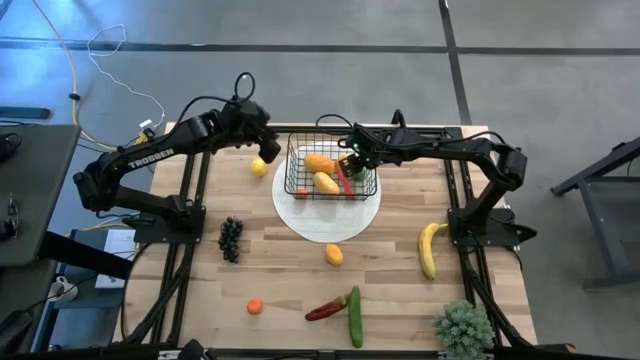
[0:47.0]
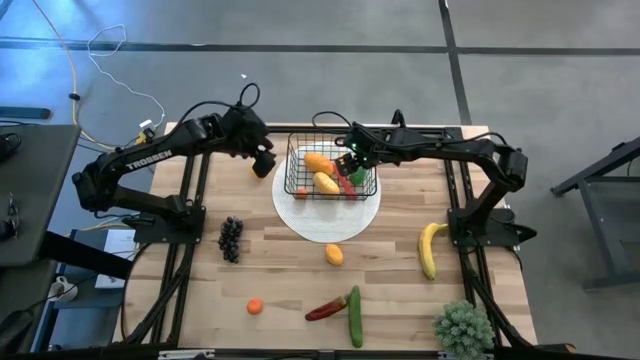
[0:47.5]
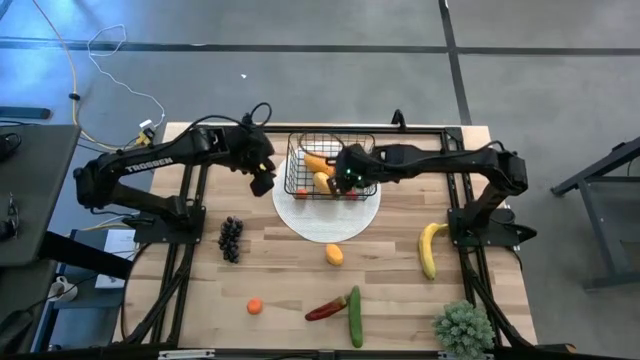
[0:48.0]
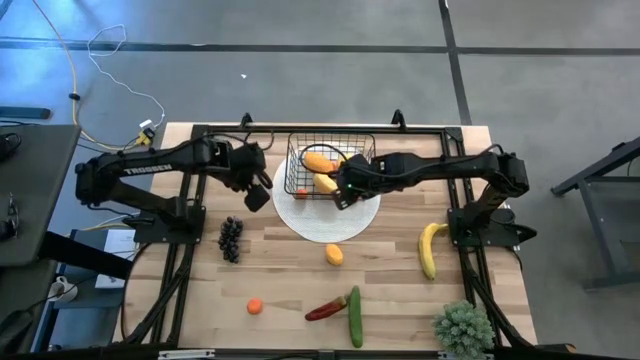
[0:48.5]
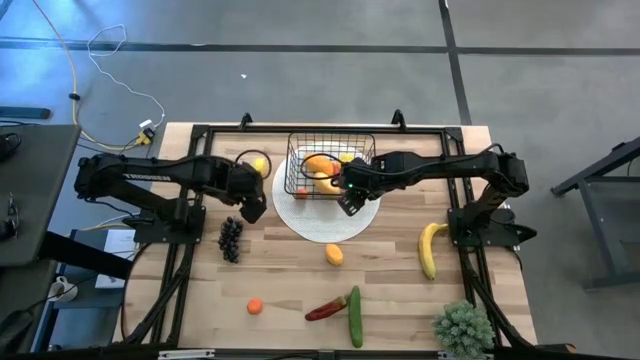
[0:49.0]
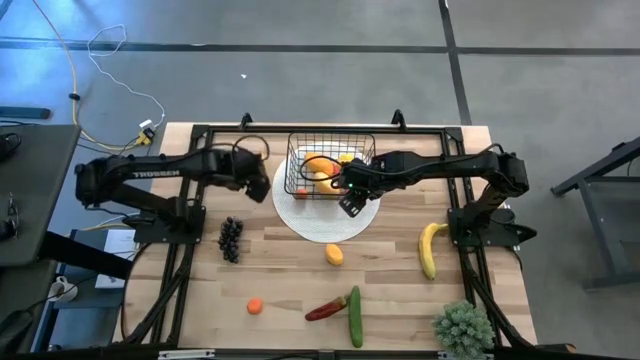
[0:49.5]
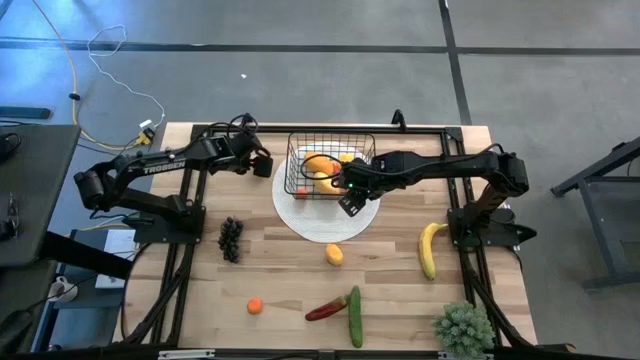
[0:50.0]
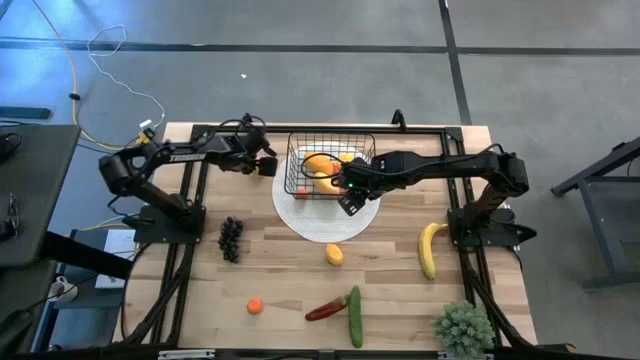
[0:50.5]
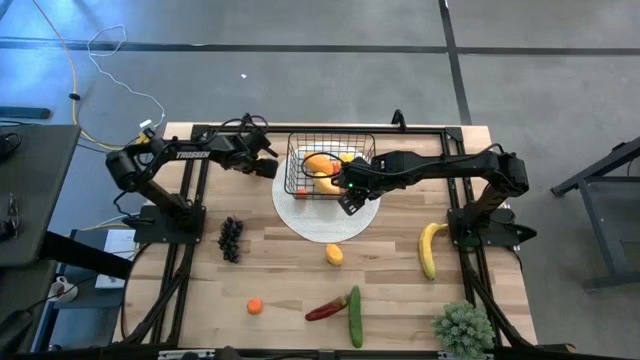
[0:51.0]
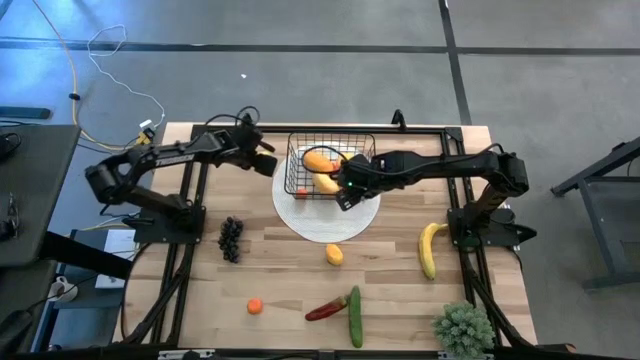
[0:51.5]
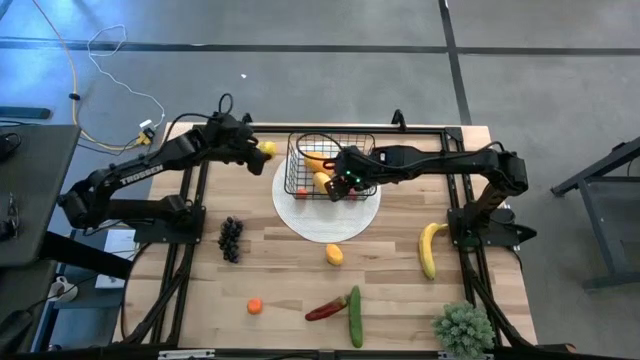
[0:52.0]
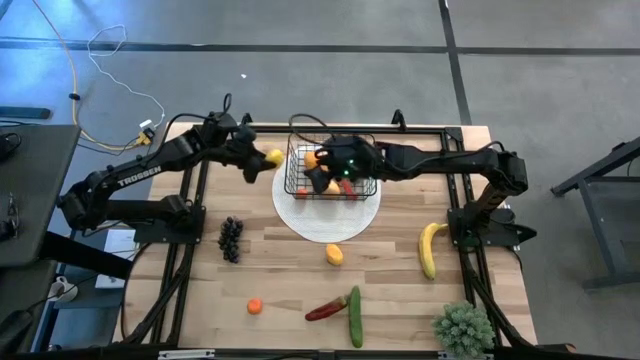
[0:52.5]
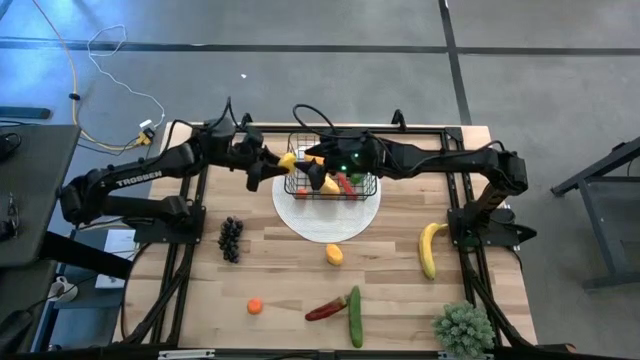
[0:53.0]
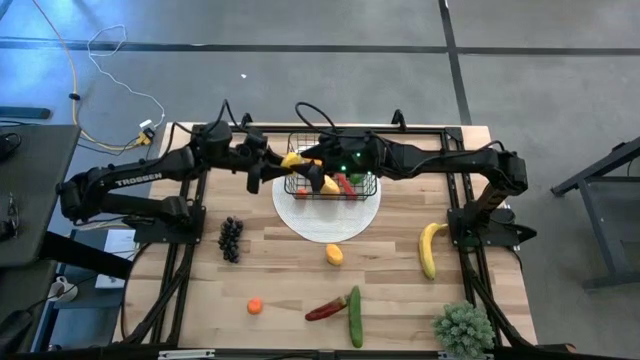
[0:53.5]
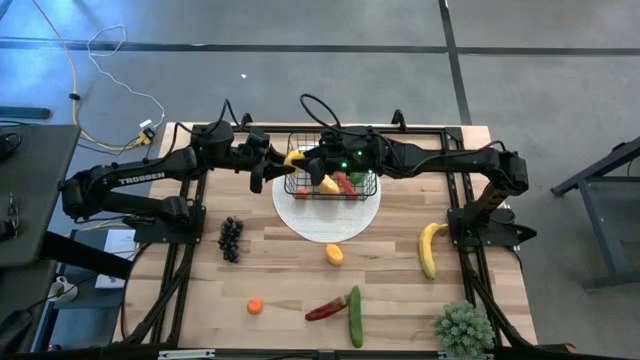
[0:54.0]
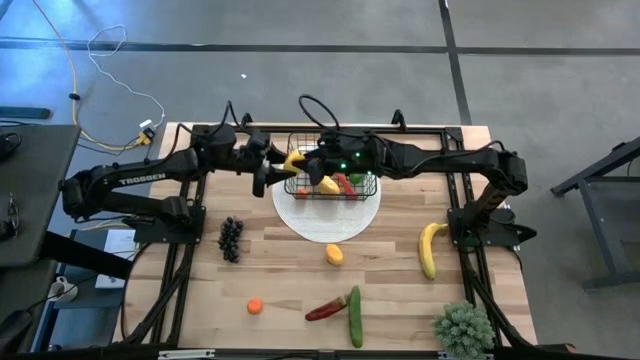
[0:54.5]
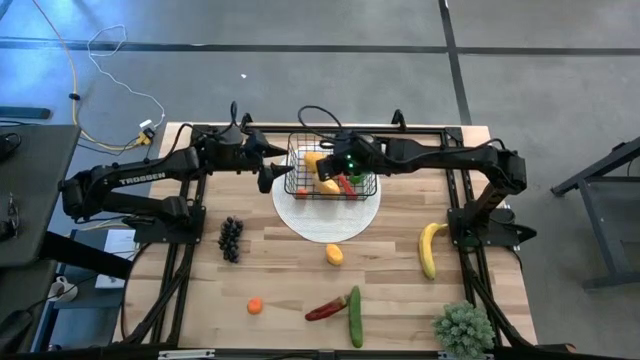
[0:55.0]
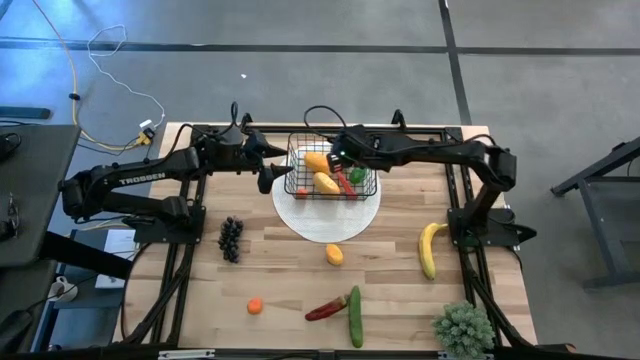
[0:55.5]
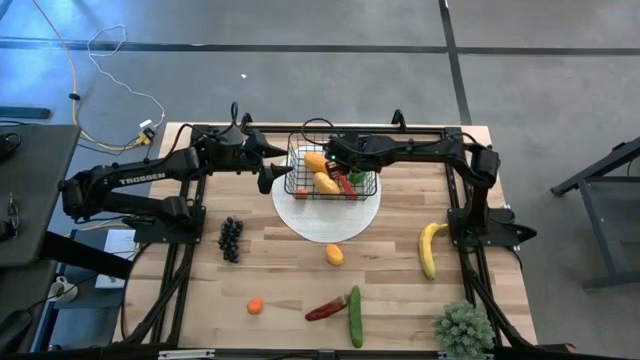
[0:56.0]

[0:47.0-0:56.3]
Task: Build produce basket
Put the top yellow lemon into the black wire basket

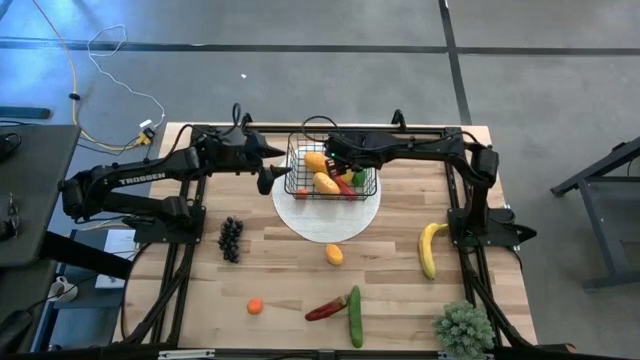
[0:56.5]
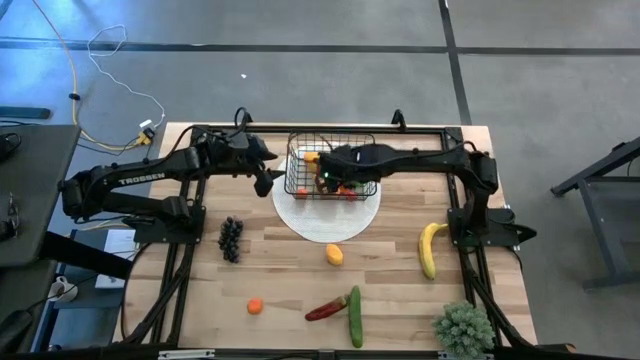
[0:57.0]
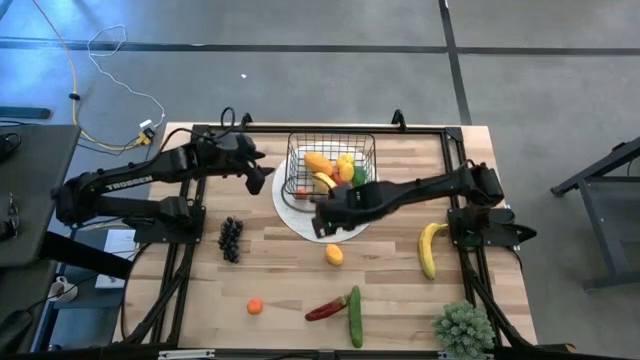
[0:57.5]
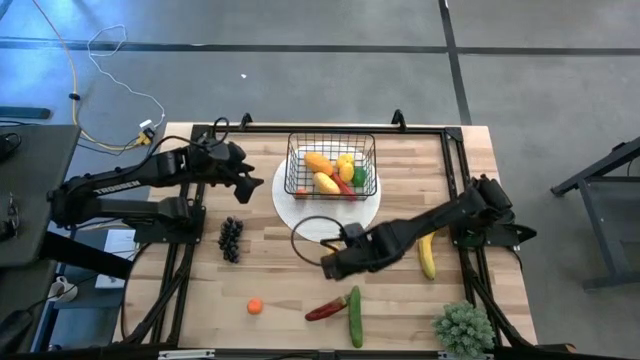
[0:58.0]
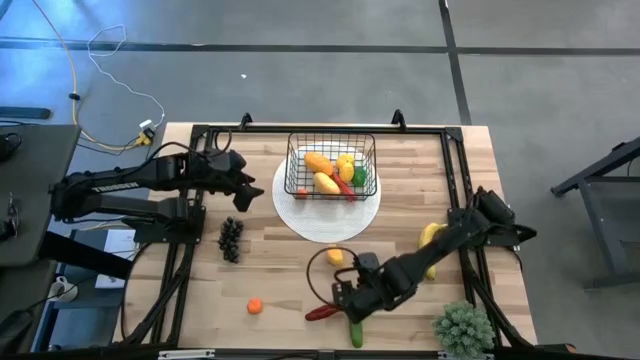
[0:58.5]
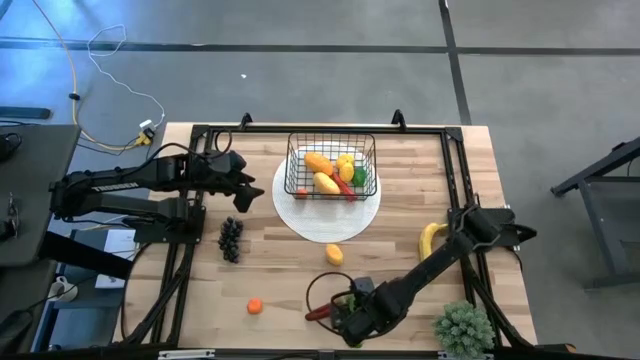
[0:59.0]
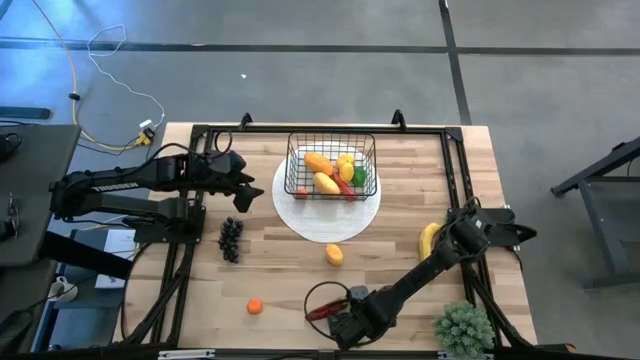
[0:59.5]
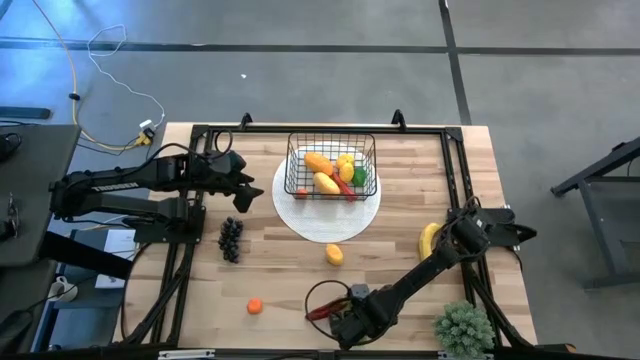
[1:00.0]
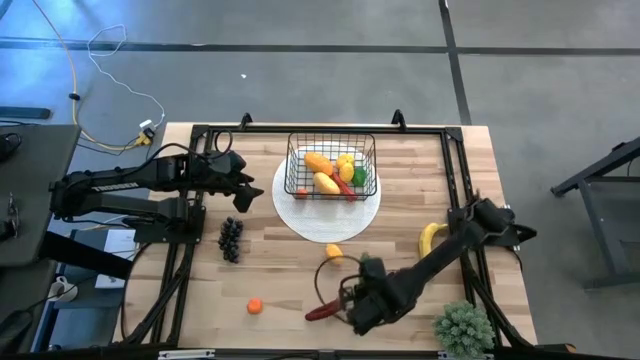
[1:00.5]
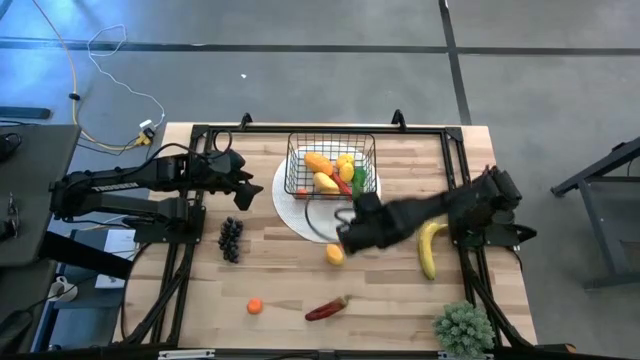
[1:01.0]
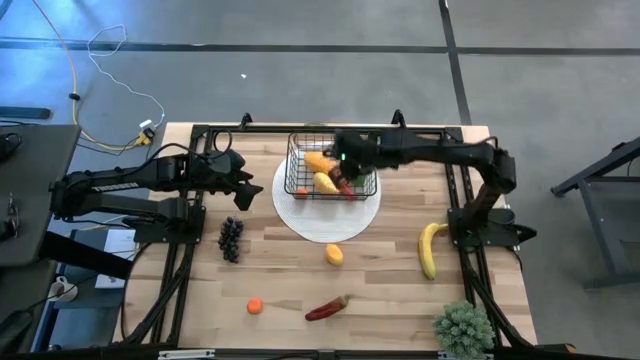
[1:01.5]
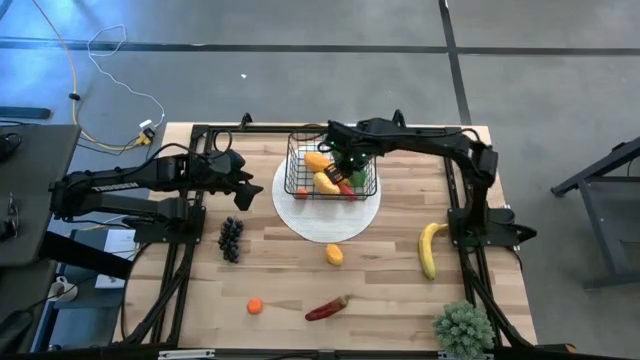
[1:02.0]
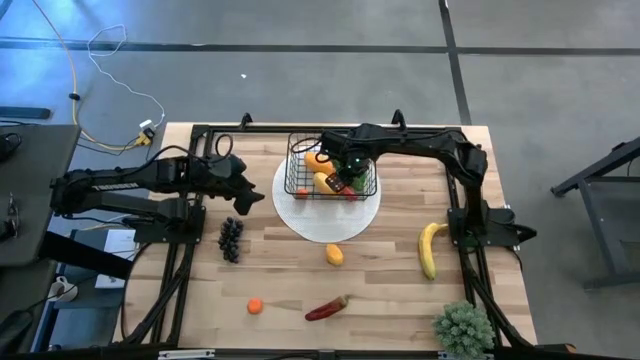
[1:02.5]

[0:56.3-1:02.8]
Put the green cucumber into the black wire basket

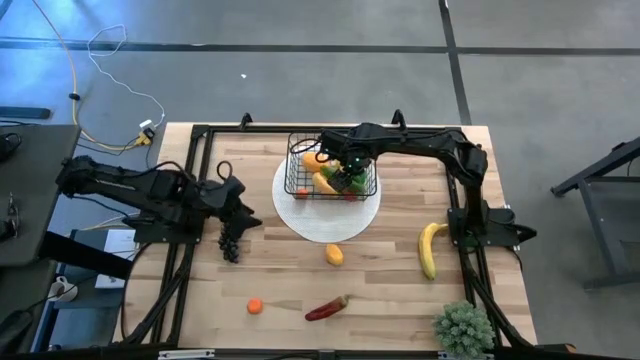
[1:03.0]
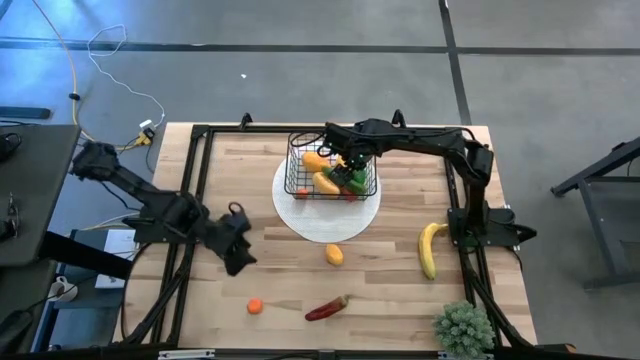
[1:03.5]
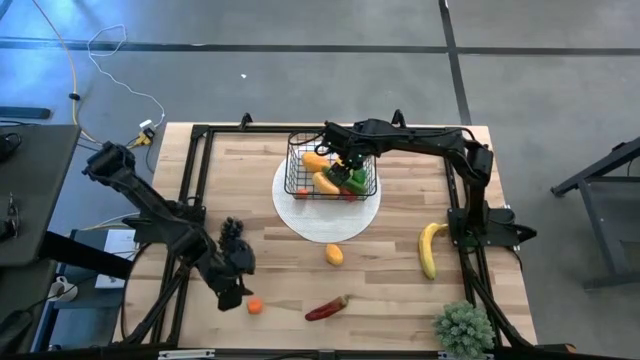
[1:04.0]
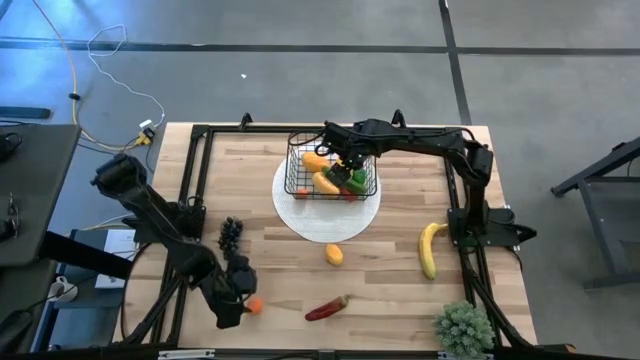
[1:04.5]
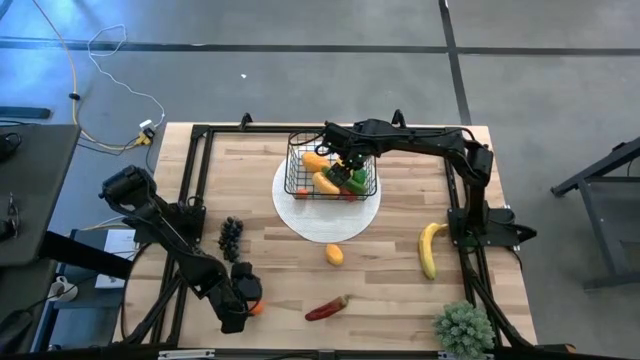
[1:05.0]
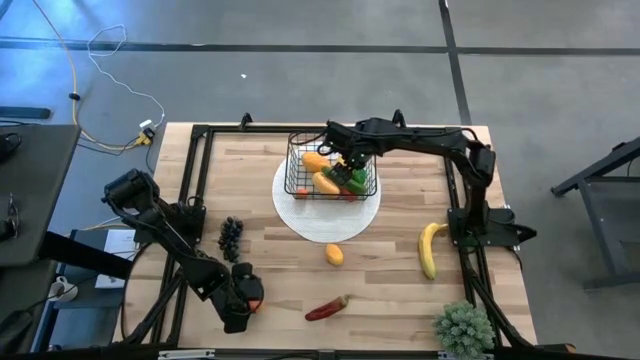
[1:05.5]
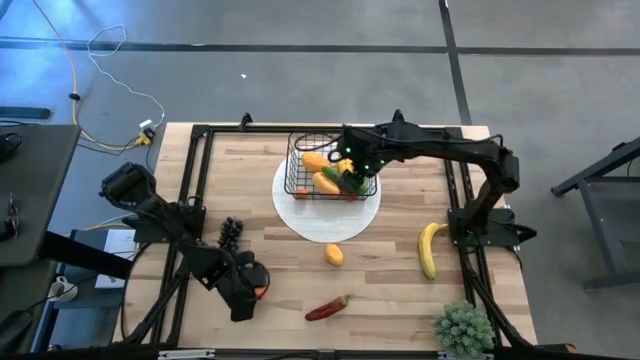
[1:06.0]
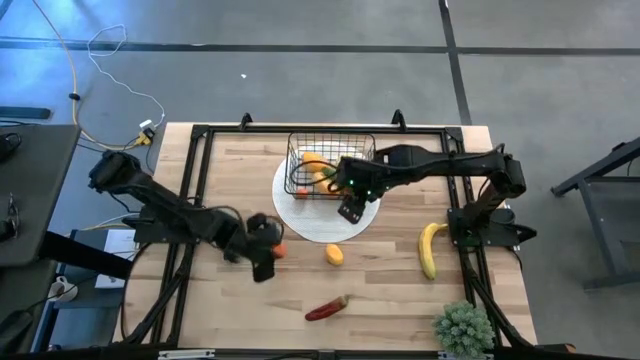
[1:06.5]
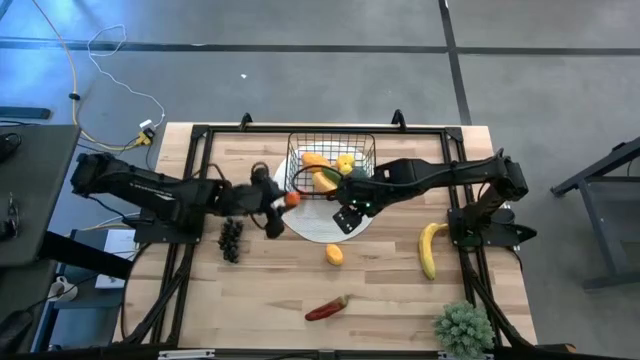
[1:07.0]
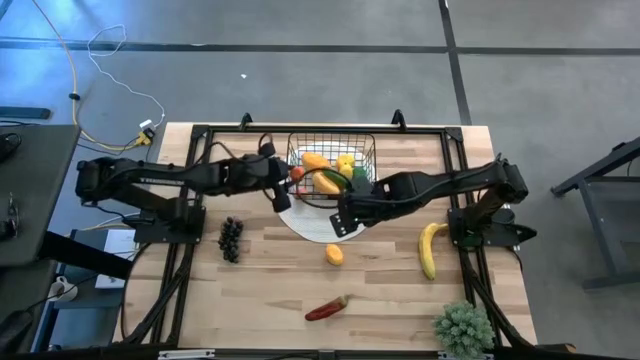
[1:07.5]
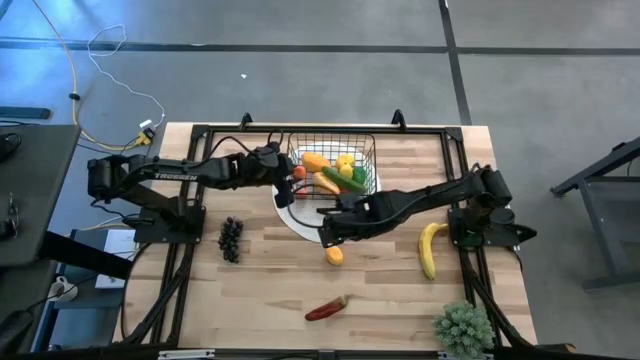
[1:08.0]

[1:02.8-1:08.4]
Put the orange into the black wire basket
